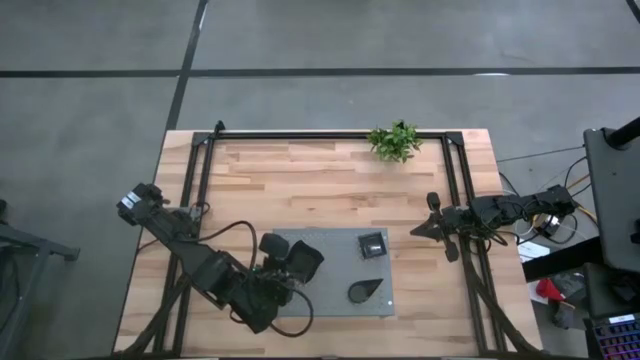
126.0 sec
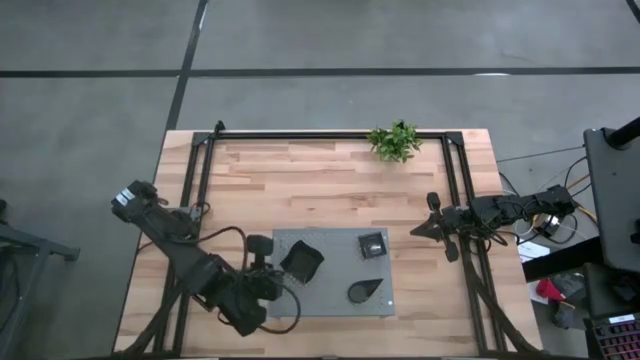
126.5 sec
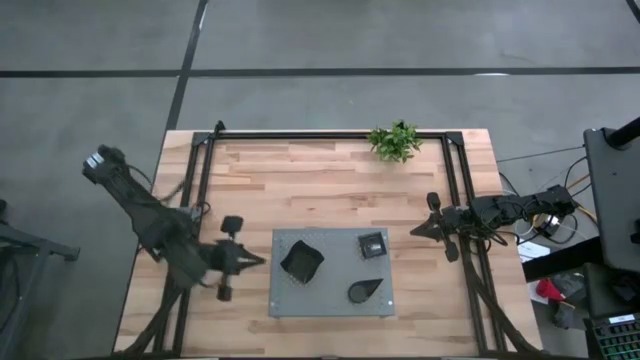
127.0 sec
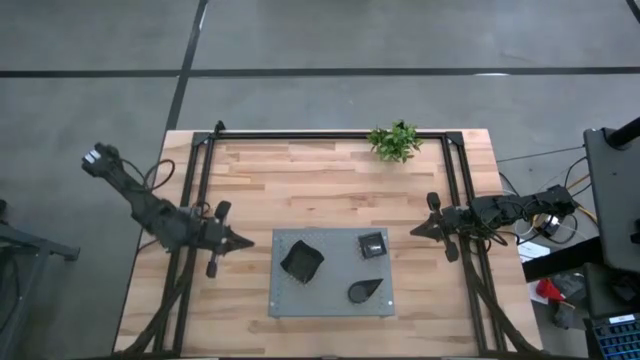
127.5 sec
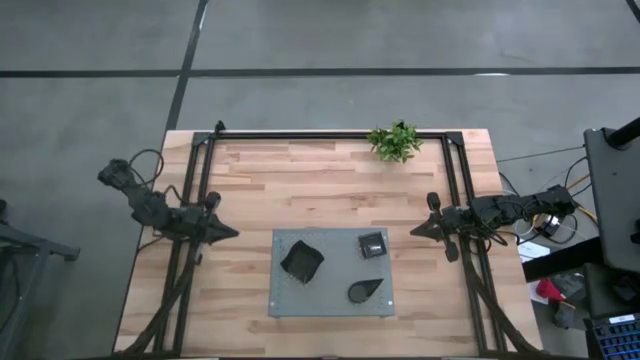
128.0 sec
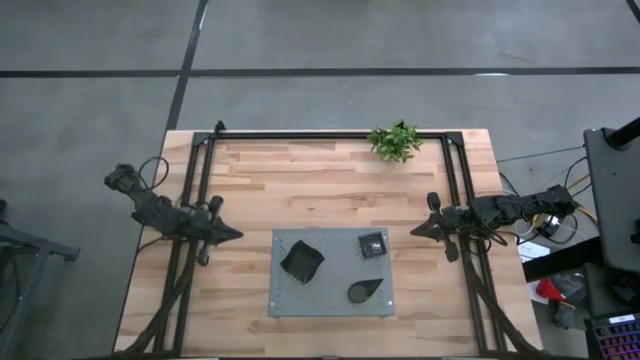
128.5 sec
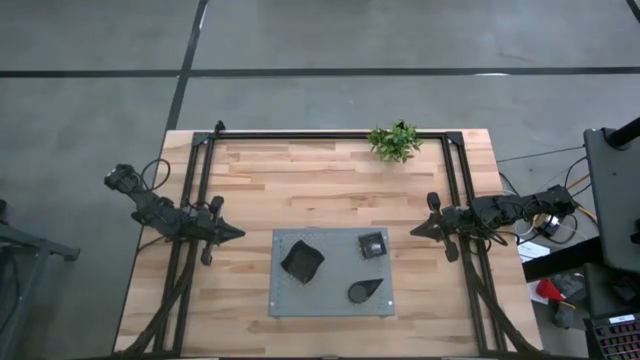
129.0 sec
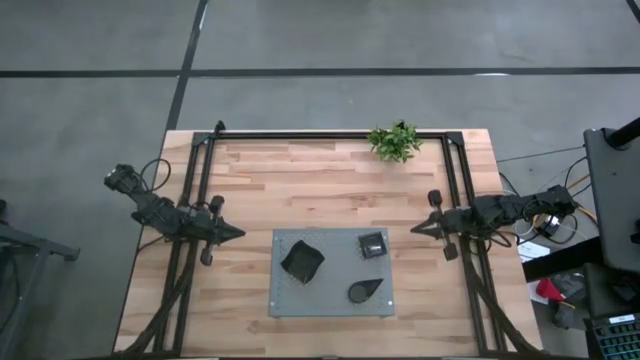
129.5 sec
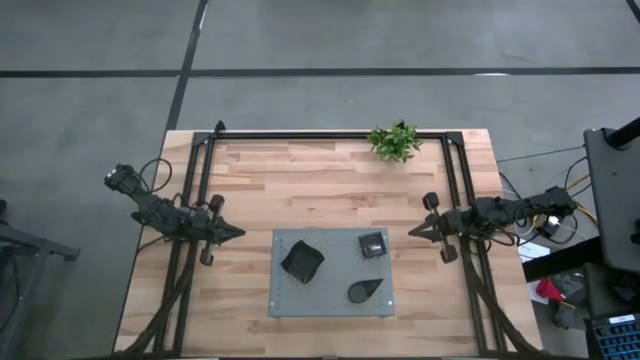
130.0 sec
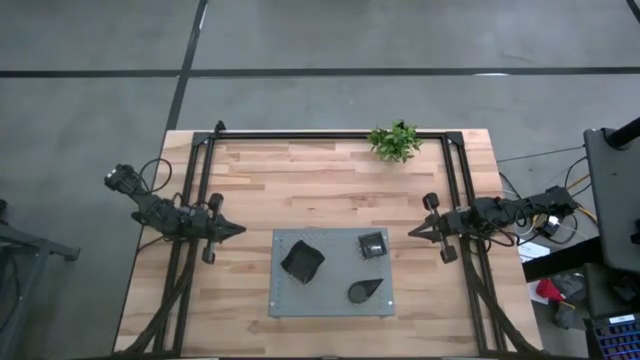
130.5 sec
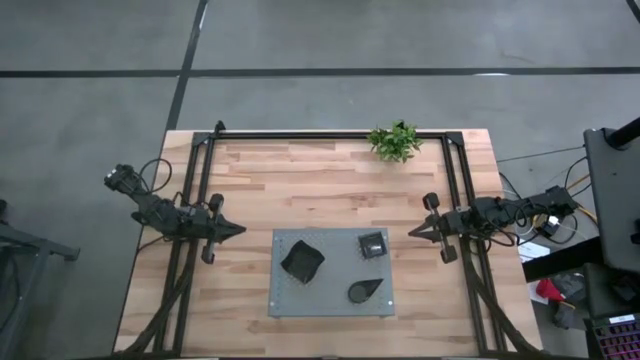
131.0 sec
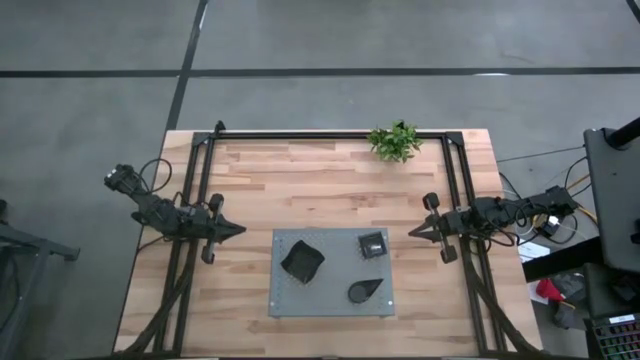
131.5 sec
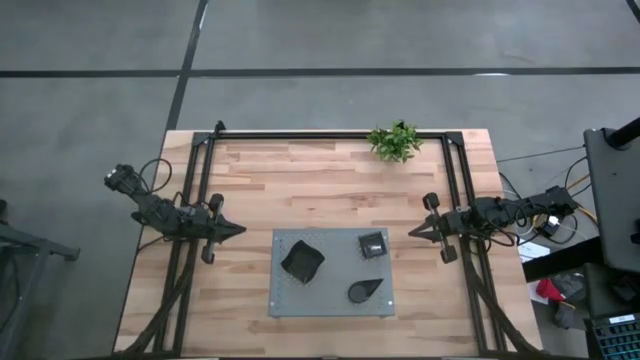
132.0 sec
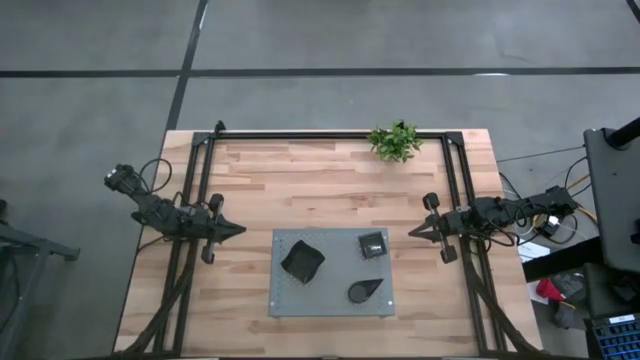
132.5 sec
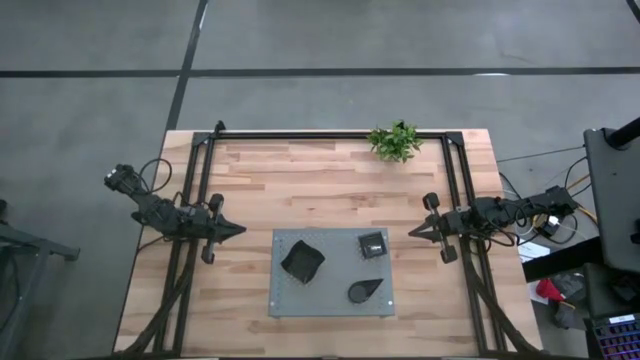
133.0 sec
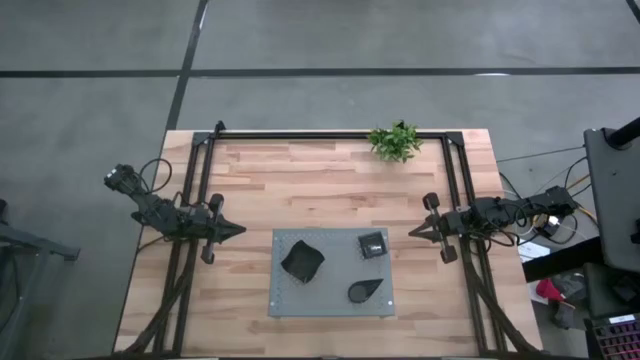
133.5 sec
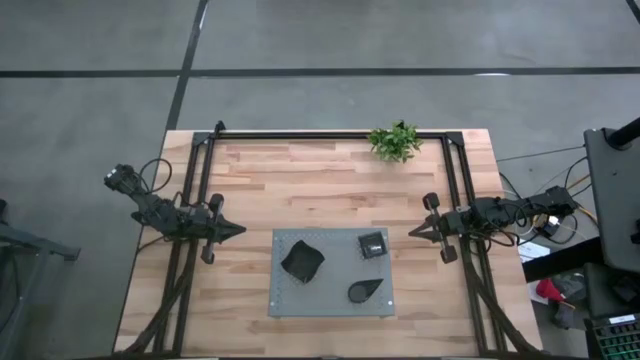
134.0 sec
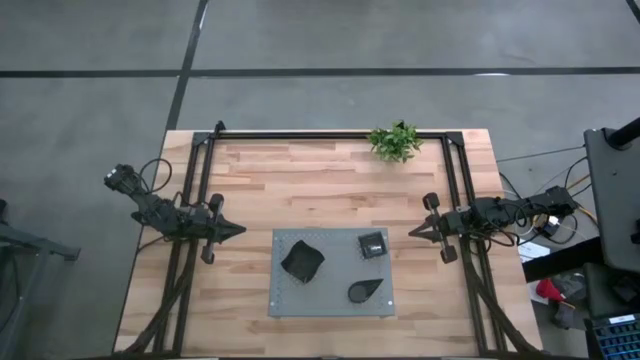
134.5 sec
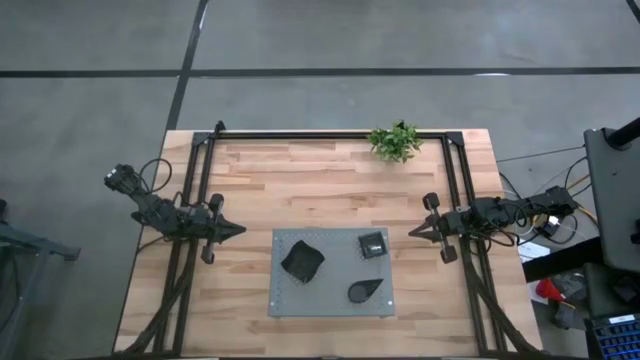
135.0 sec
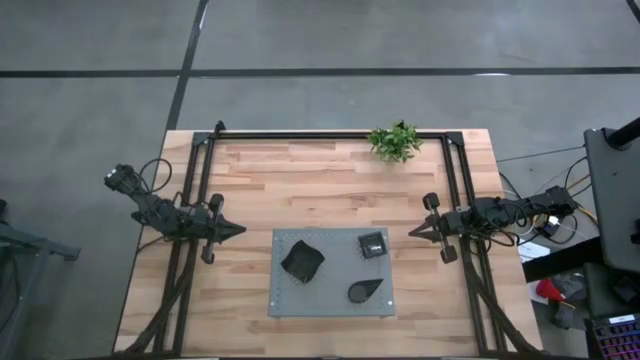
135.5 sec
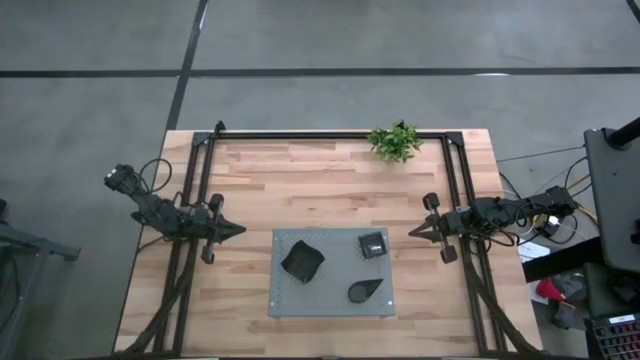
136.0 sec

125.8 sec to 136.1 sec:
Task: Pick & Place Mini shaped plates
Return to Home Position

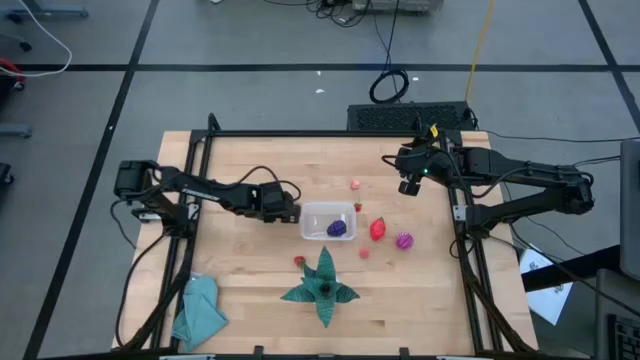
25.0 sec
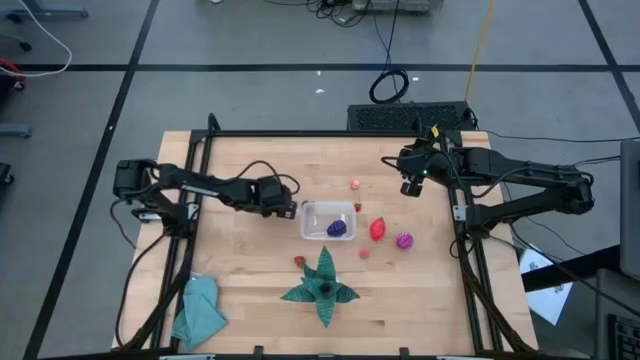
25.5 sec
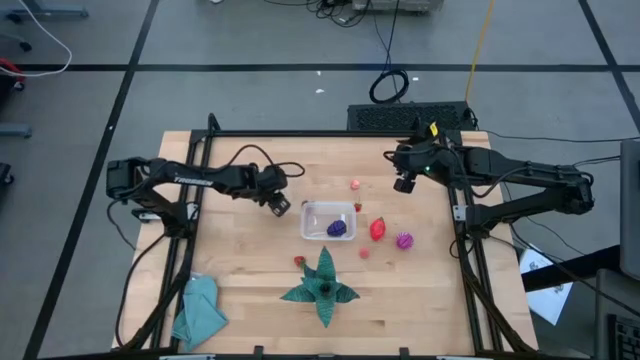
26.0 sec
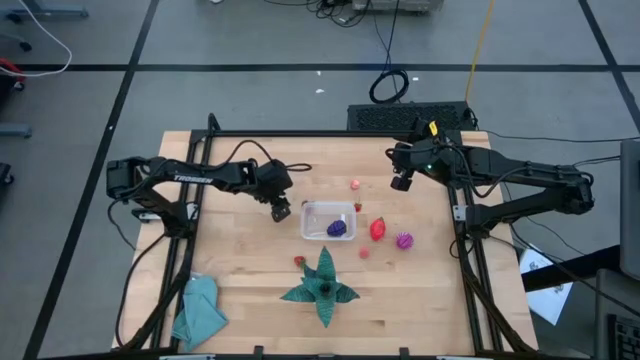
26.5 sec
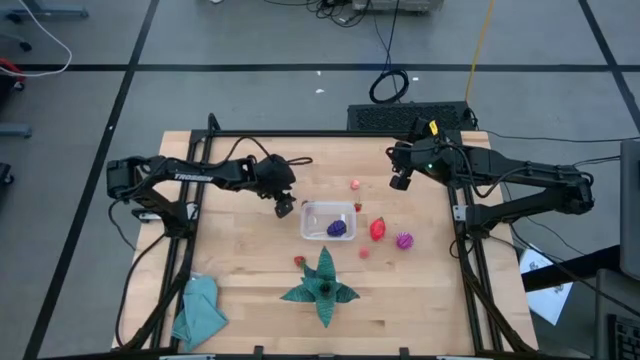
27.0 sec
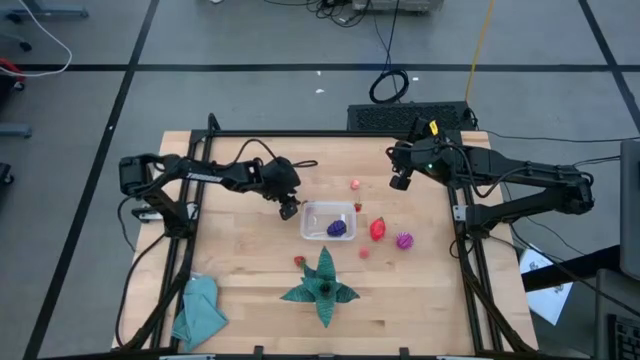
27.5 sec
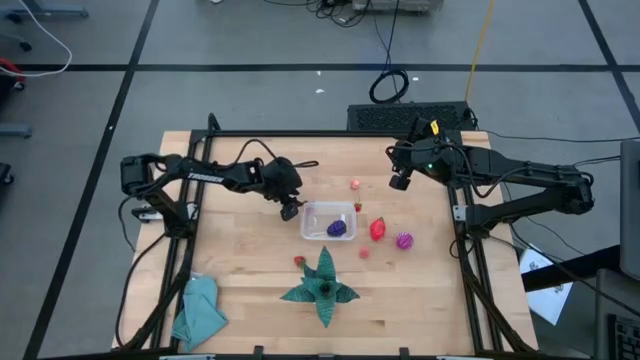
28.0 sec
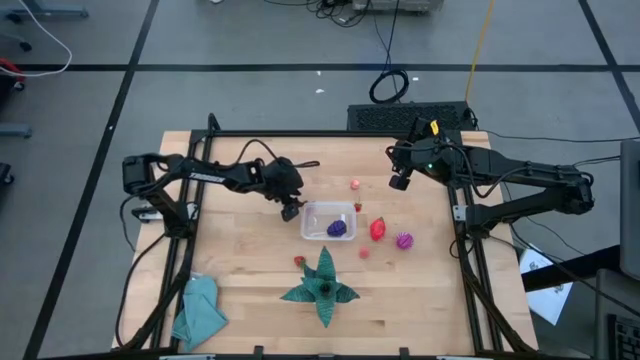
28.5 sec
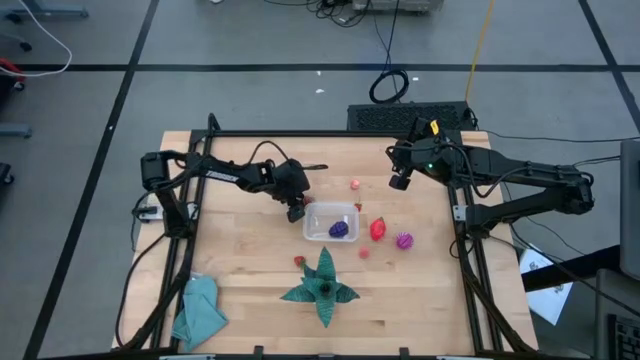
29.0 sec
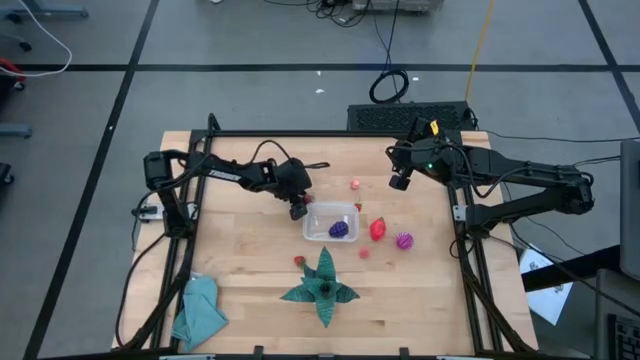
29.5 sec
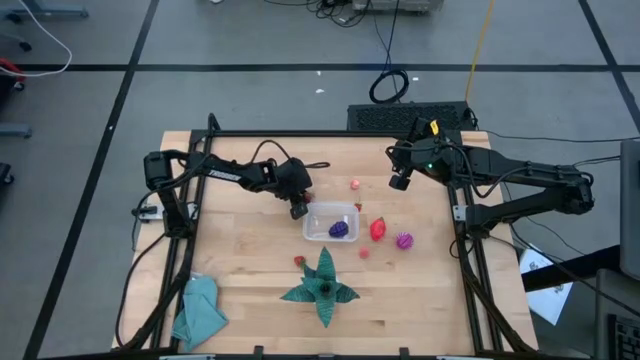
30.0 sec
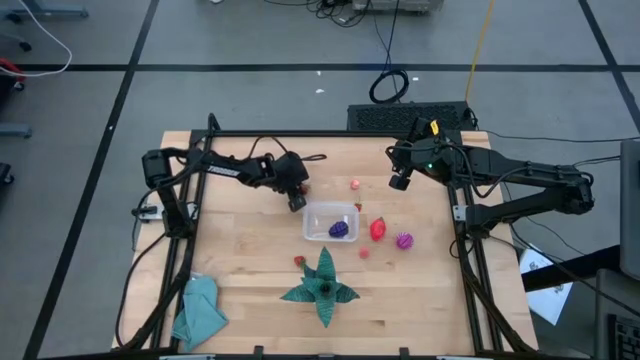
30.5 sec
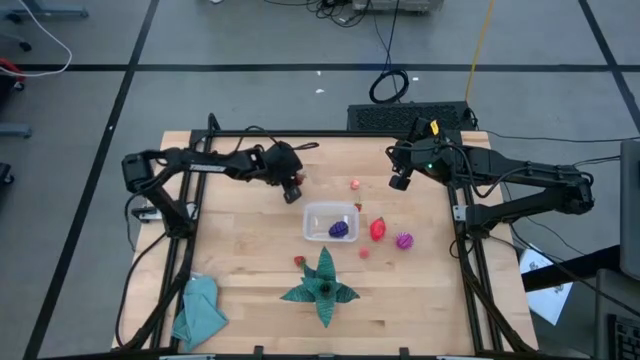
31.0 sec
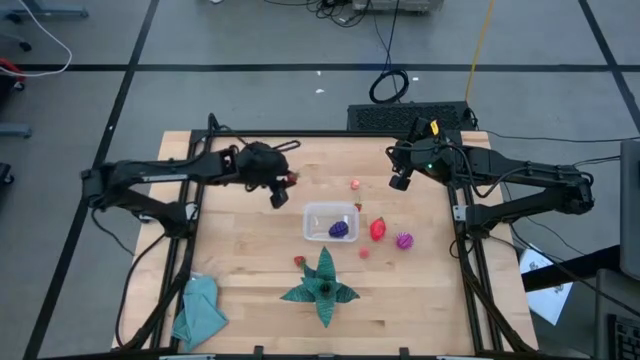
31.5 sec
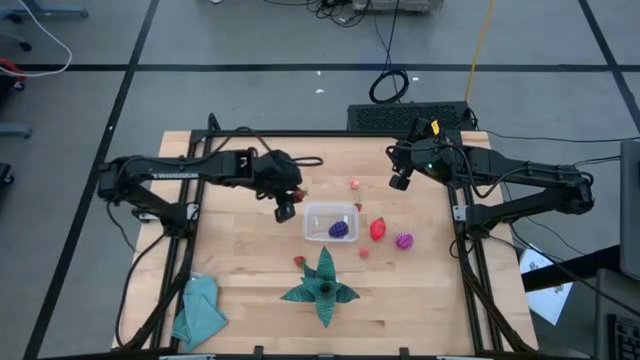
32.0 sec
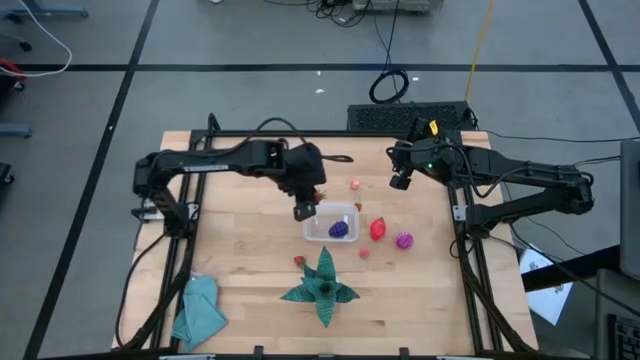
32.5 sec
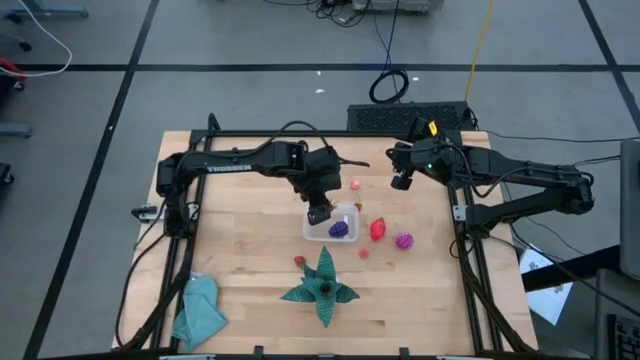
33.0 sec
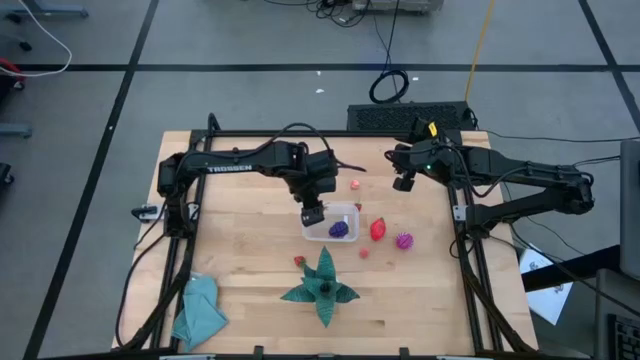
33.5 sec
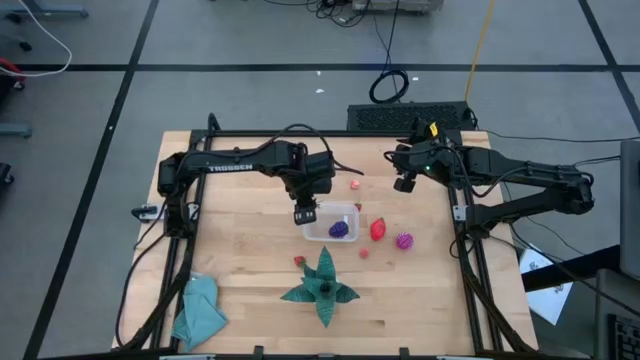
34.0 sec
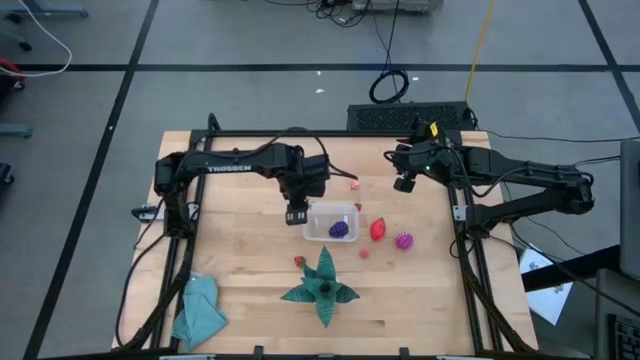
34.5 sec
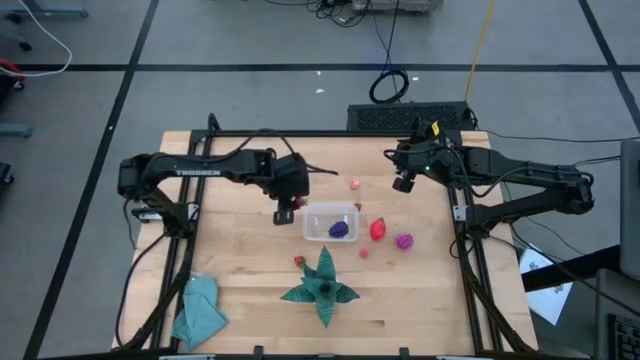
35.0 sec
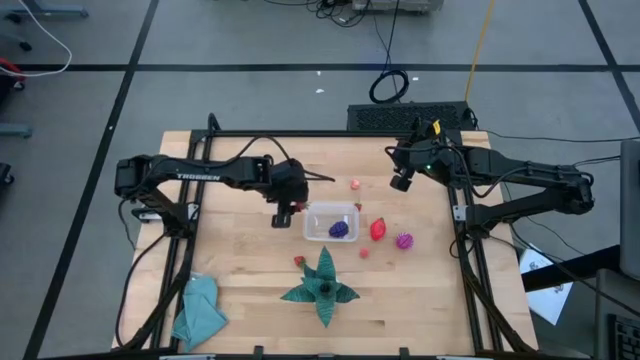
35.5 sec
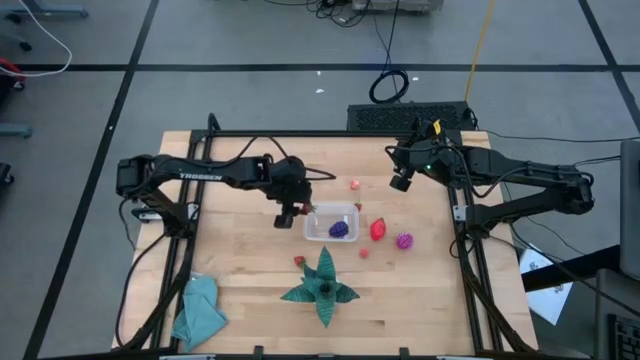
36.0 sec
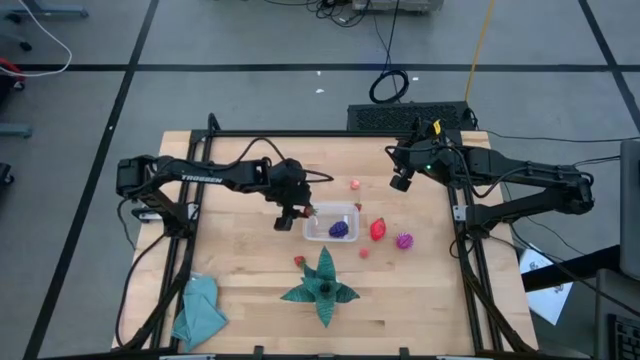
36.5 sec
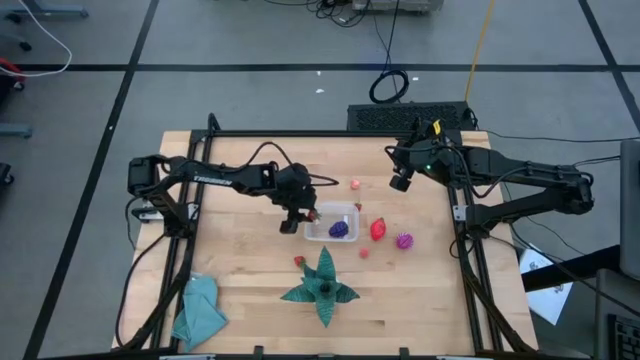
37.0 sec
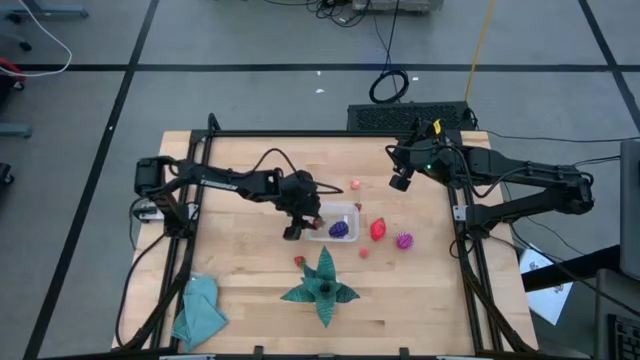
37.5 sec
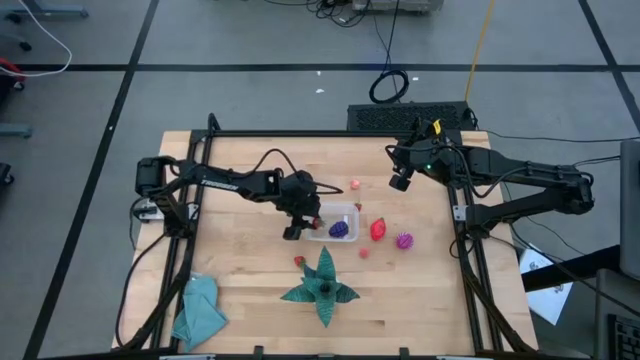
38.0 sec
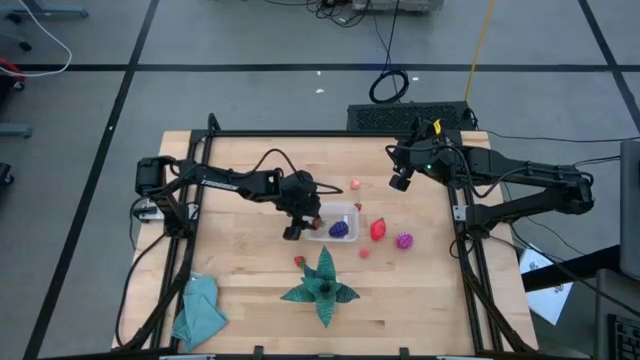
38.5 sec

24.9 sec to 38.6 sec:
Task: Pick and placing Produce into tupperware
Put the red strawberry into the transparent bin
